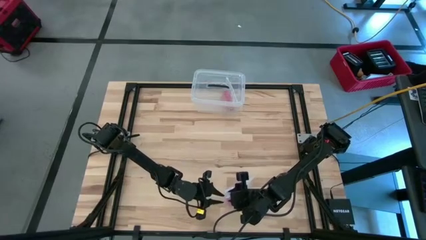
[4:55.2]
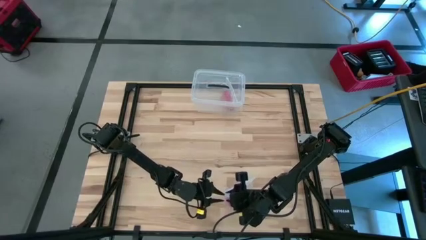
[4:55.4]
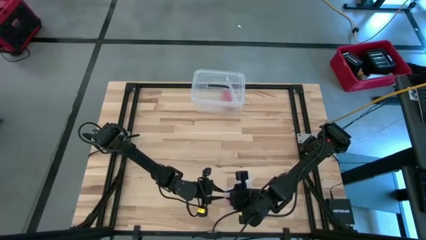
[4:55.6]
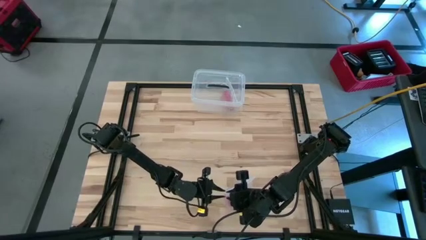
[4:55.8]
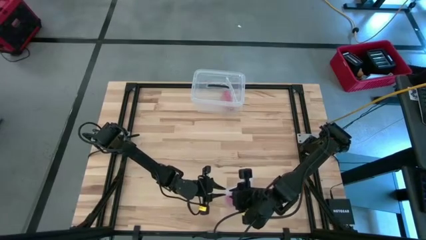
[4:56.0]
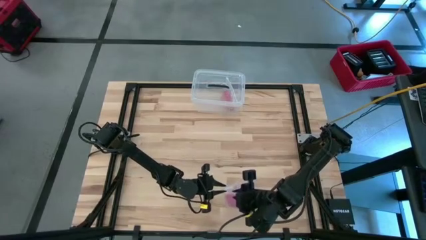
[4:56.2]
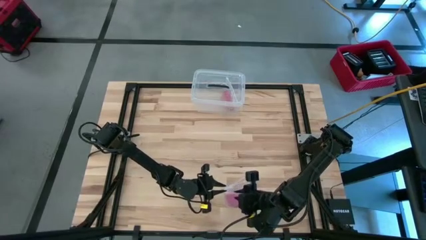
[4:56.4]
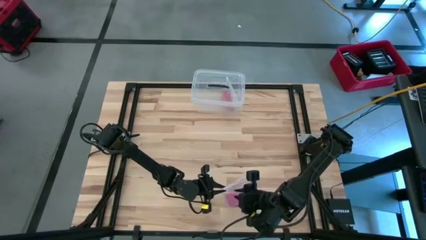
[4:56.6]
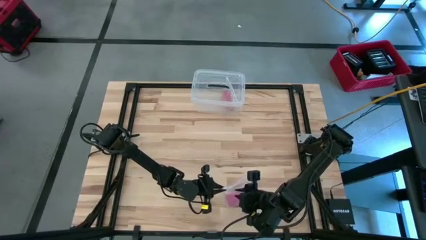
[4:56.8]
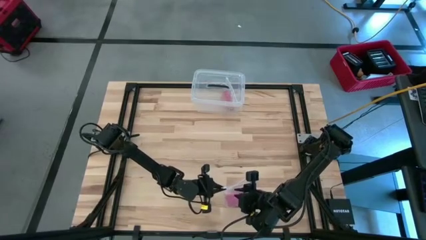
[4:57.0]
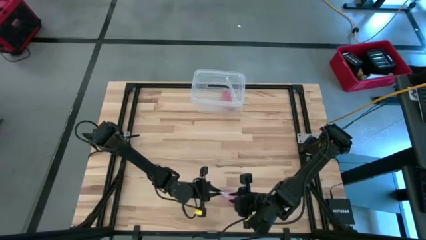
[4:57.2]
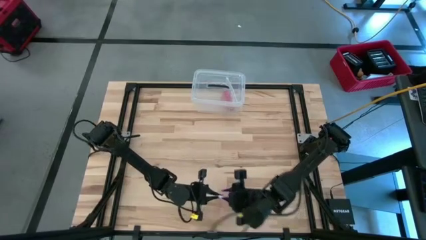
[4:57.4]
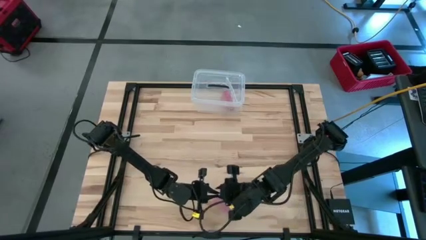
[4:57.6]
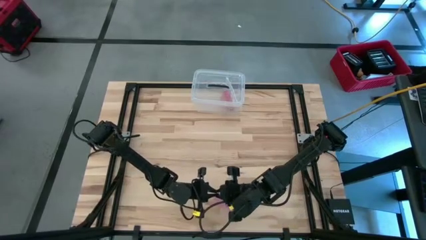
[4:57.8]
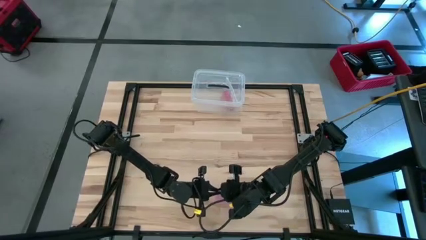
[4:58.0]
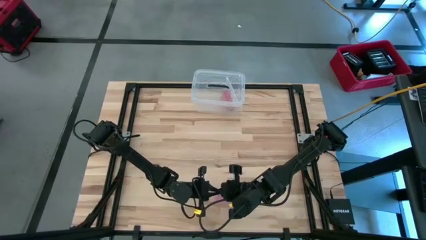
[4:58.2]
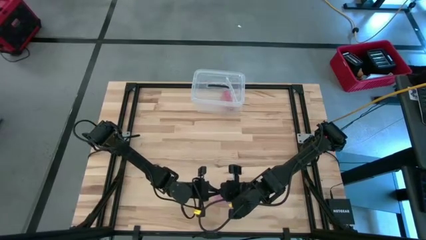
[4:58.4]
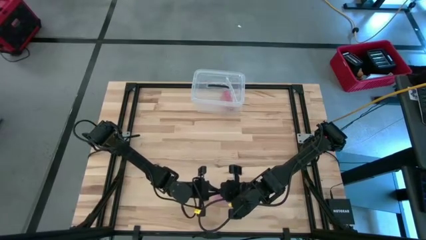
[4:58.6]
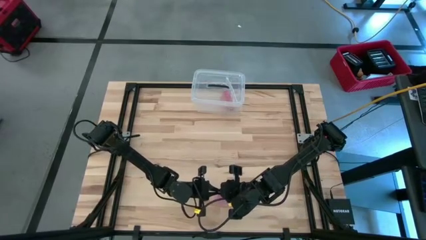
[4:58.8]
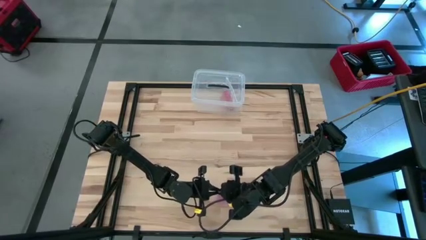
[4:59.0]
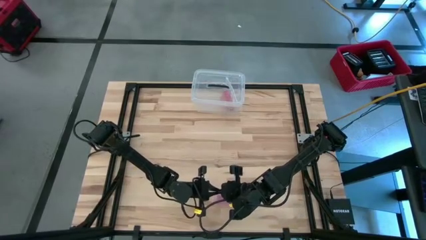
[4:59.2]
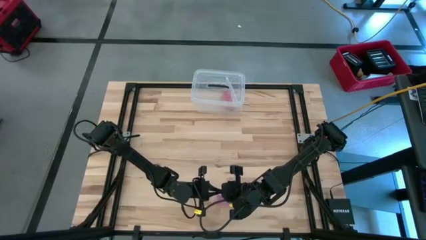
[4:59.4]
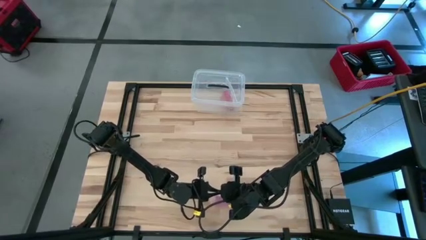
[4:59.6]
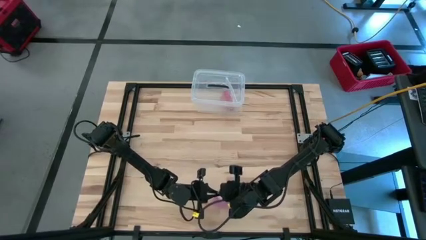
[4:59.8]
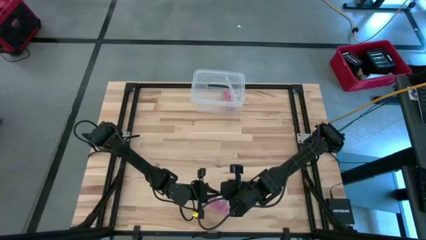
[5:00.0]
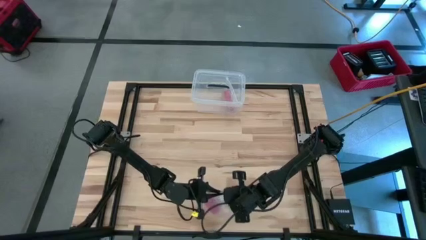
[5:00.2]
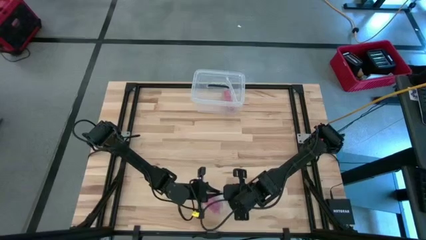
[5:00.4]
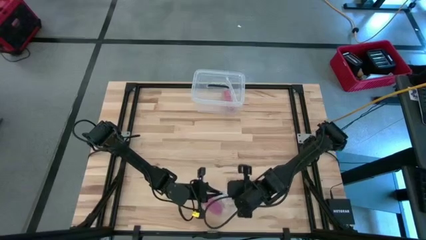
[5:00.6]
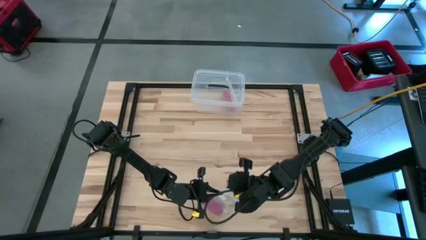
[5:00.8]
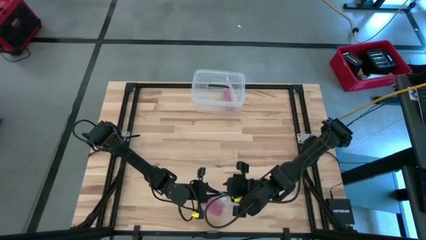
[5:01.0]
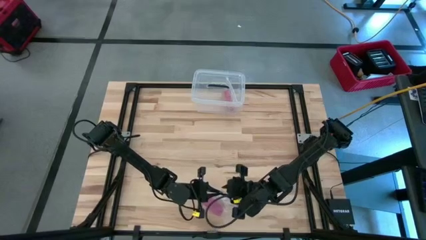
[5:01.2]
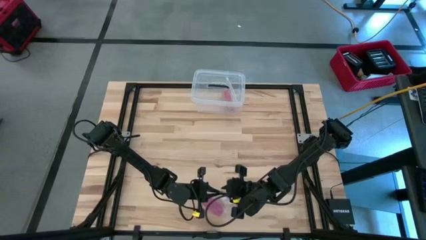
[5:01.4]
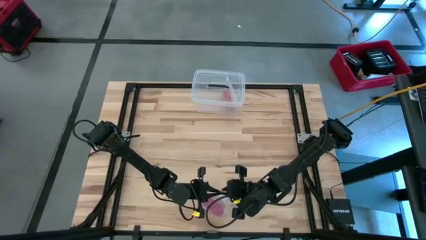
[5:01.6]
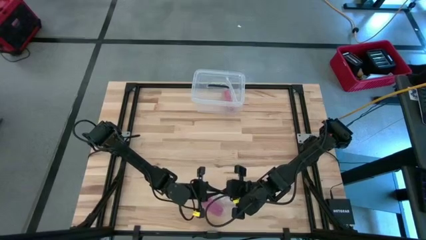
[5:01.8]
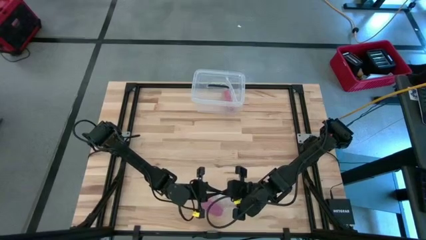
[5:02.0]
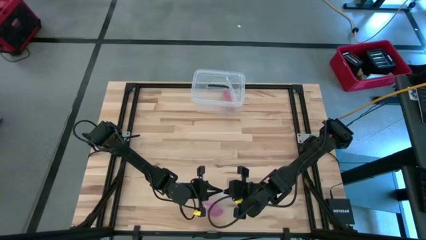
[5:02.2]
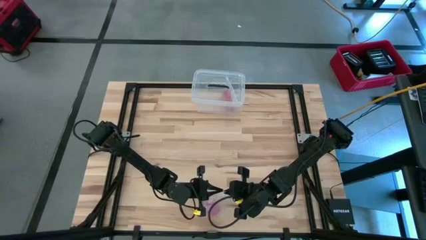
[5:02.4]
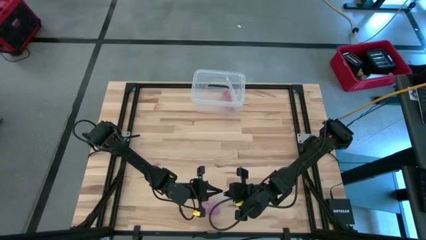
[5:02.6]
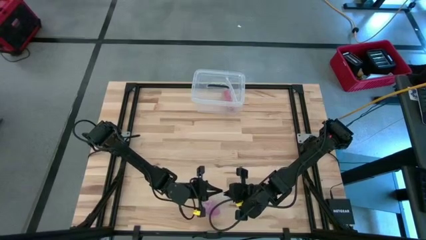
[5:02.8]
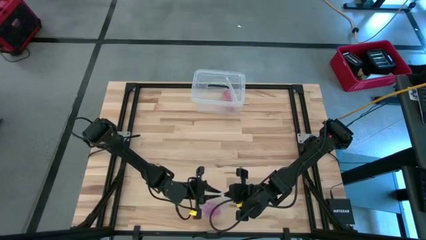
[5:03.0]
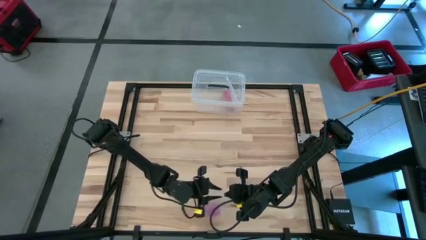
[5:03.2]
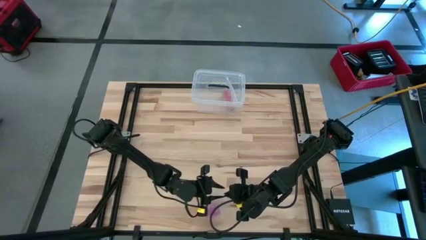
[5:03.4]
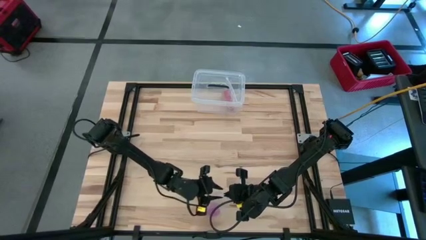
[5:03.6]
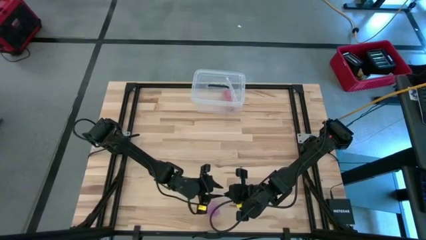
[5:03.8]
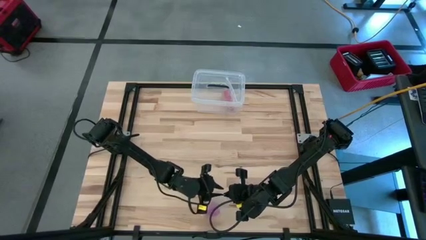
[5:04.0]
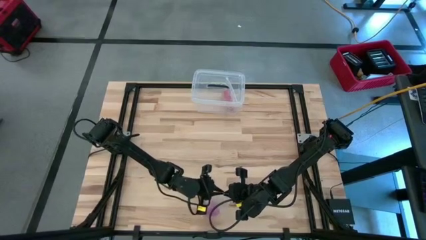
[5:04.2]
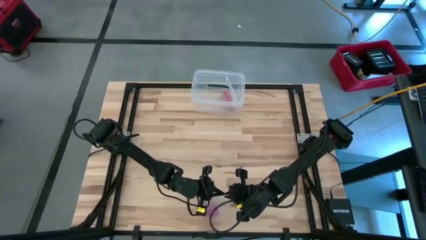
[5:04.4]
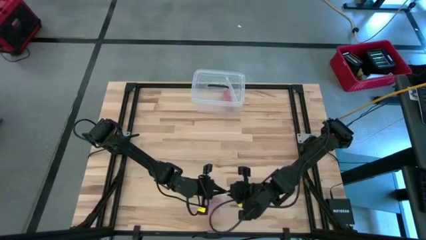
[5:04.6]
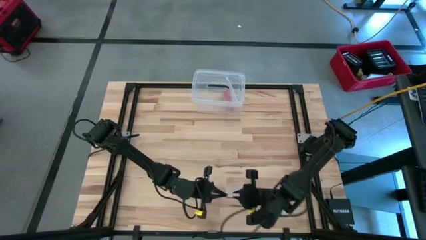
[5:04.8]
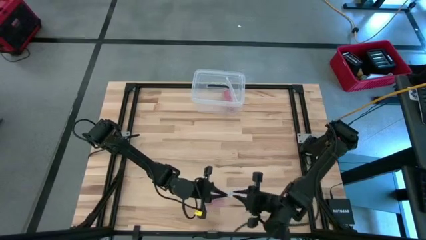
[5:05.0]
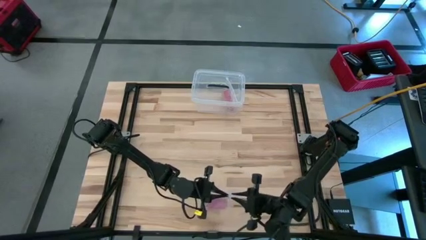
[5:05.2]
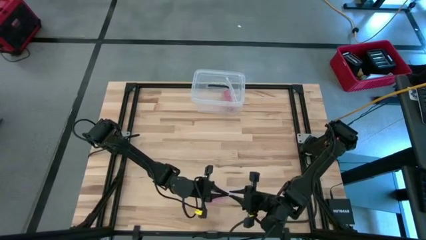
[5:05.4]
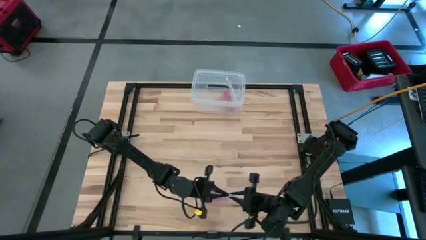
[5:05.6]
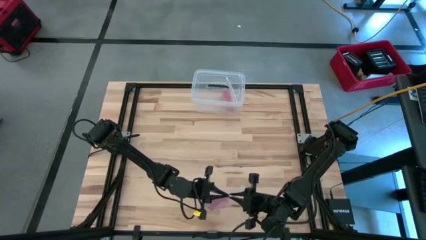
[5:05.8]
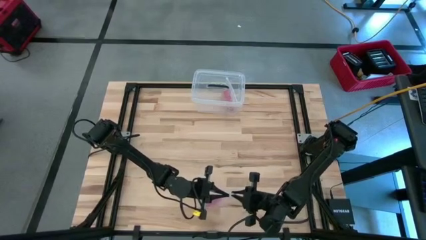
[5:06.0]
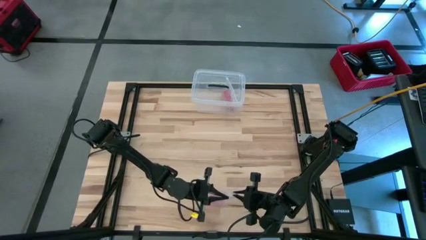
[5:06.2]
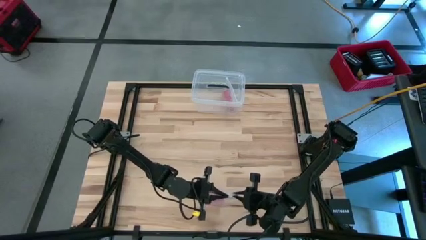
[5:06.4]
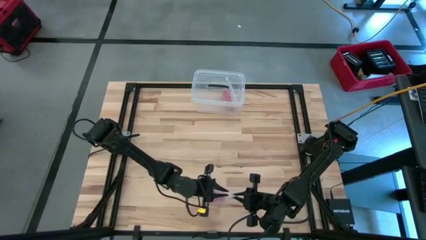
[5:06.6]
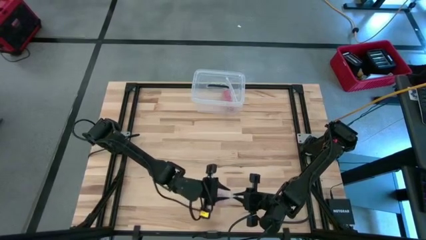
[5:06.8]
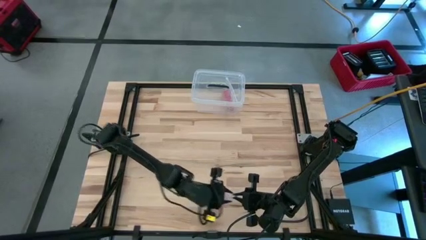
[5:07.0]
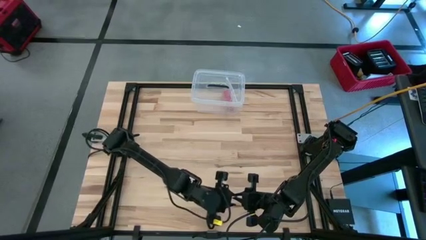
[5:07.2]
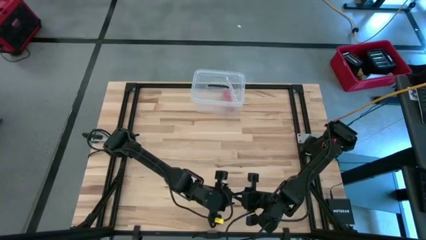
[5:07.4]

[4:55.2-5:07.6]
Task: Roll bandage
Close the transparent zip bag

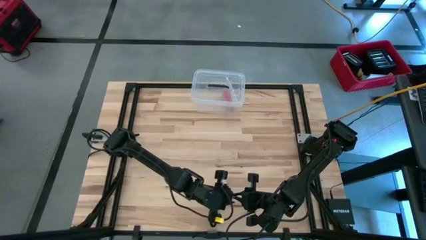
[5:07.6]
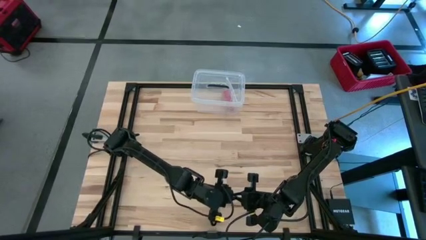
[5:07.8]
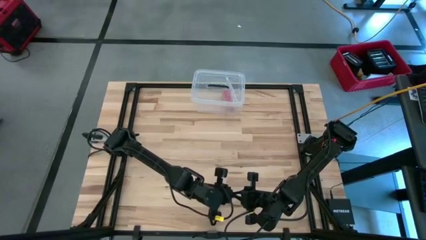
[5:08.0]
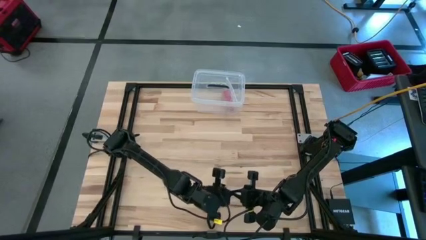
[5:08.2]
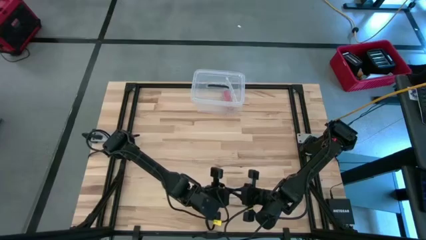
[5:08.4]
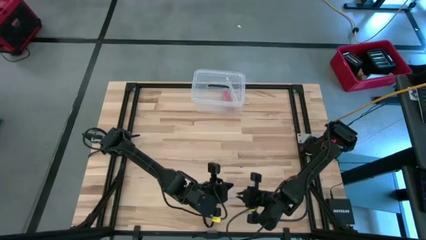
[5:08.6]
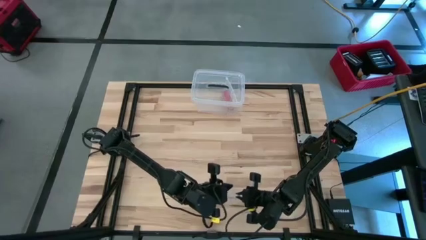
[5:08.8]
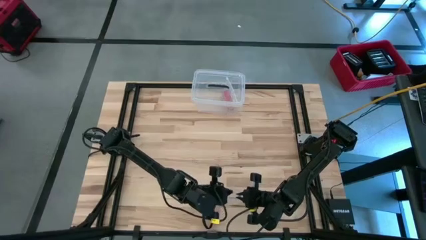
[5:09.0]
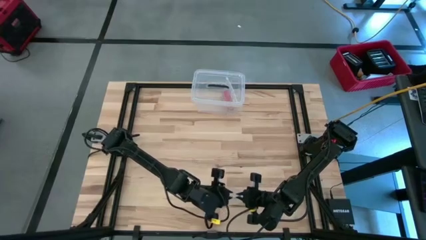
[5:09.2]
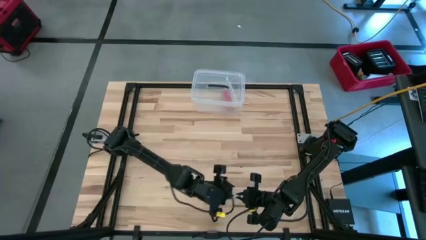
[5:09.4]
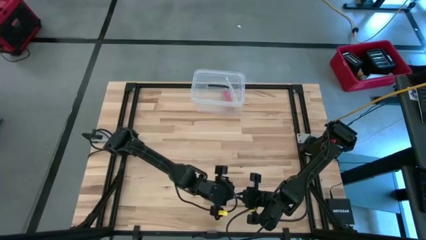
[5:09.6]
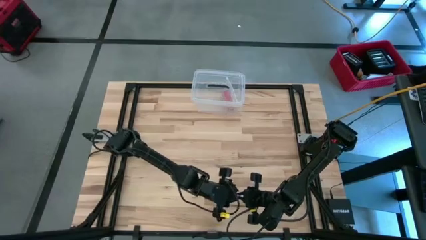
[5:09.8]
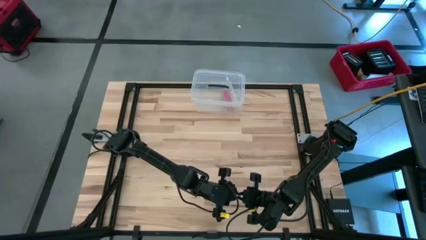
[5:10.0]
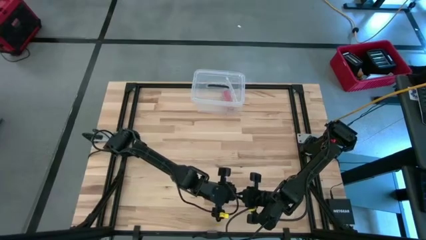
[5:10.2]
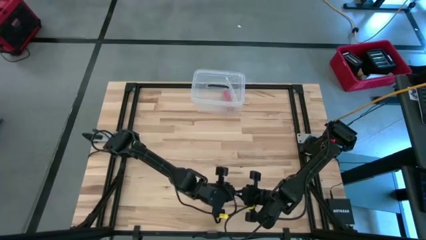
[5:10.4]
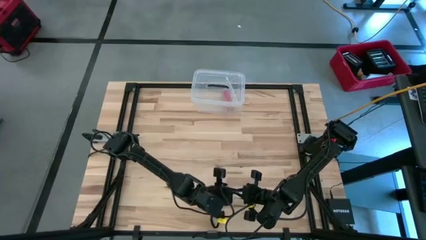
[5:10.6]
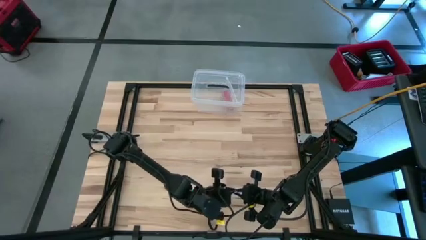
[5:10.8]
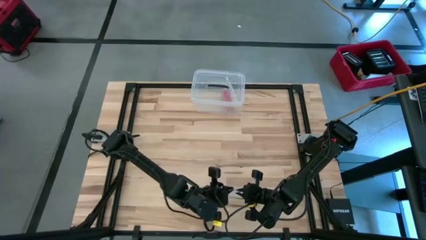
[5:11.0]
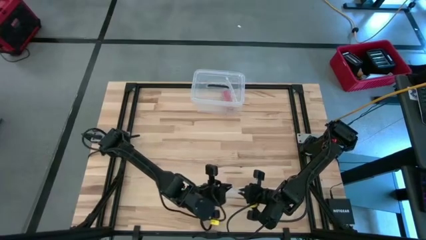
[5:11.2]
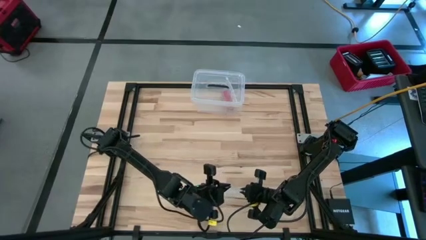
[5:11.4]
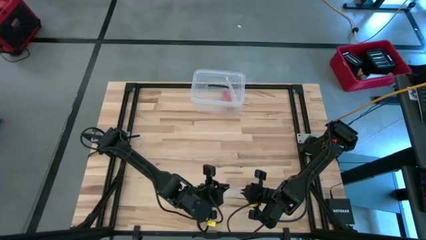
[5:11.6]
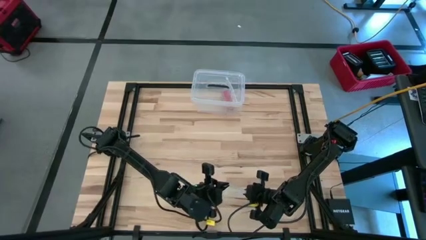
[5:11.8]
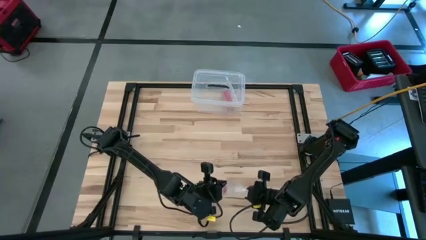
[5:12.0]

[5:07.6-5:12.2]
Close the transparent zip bag
